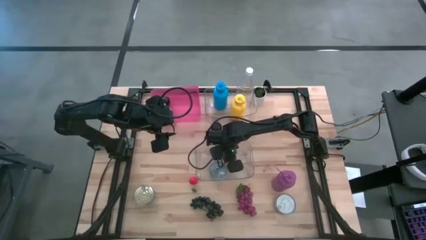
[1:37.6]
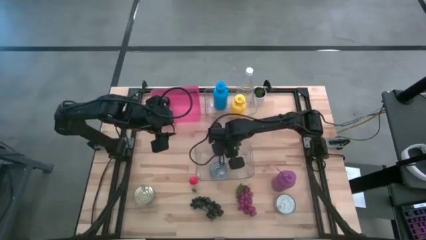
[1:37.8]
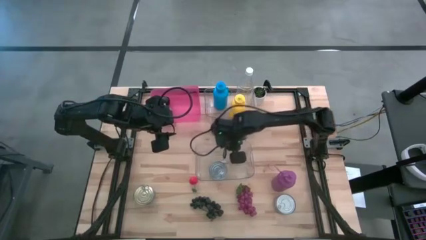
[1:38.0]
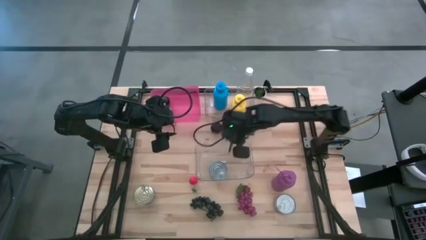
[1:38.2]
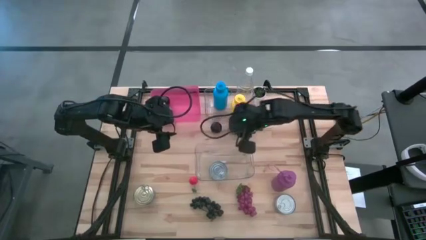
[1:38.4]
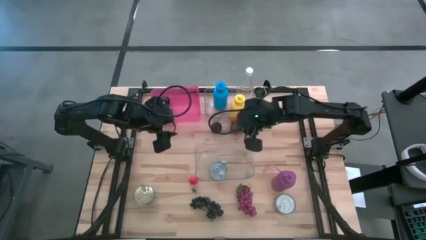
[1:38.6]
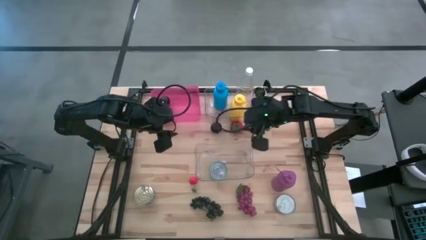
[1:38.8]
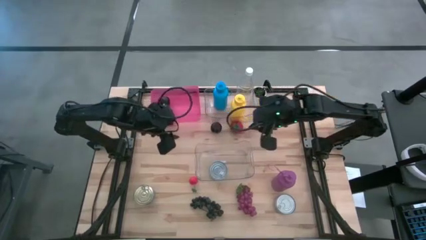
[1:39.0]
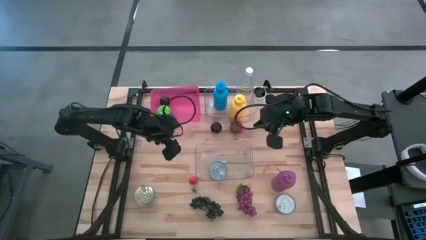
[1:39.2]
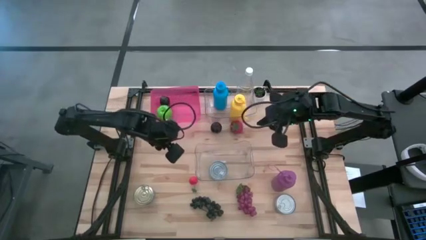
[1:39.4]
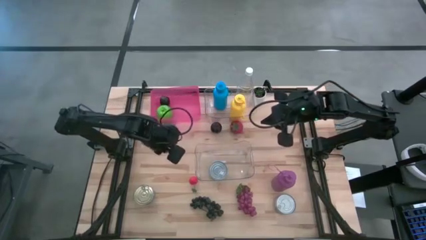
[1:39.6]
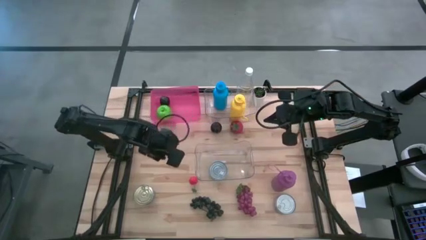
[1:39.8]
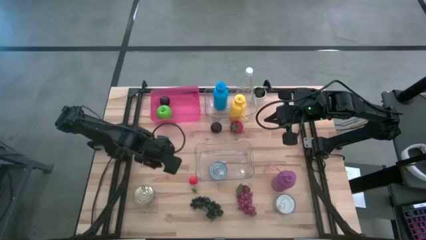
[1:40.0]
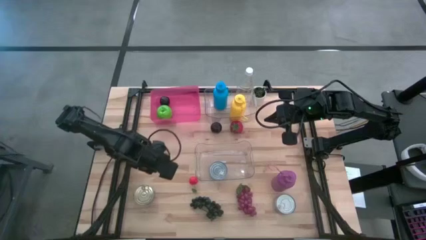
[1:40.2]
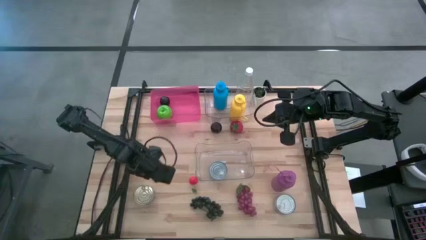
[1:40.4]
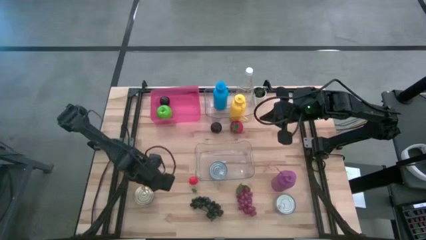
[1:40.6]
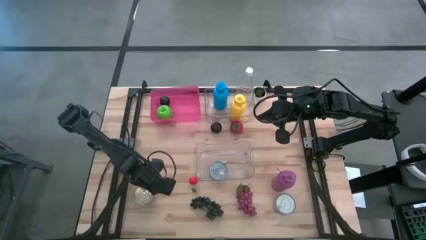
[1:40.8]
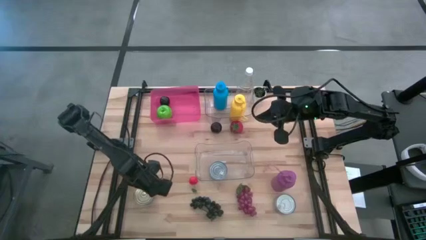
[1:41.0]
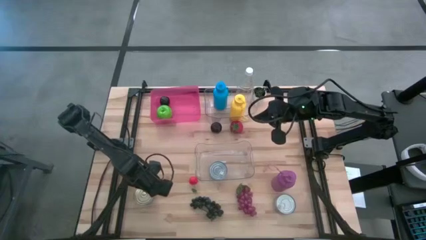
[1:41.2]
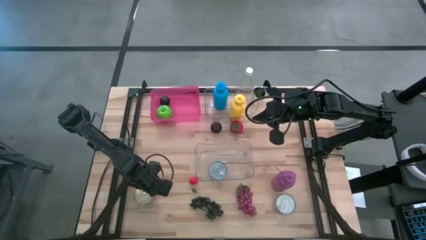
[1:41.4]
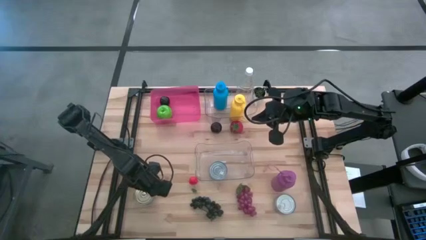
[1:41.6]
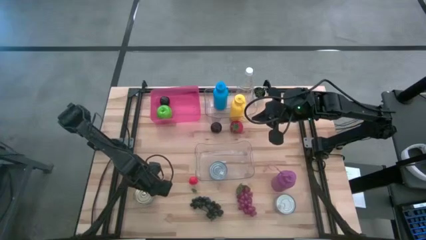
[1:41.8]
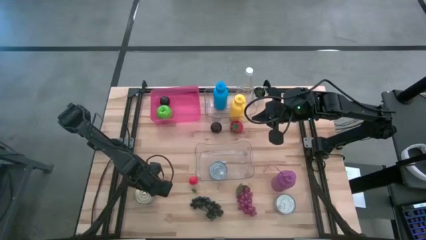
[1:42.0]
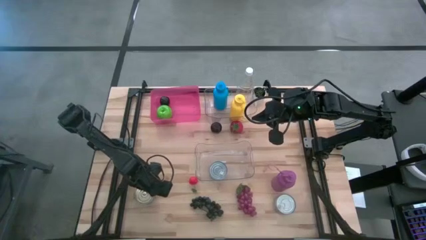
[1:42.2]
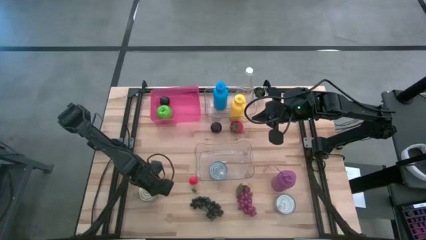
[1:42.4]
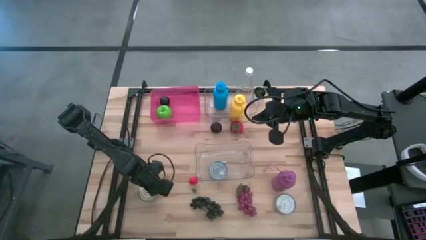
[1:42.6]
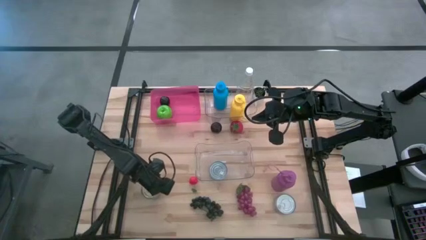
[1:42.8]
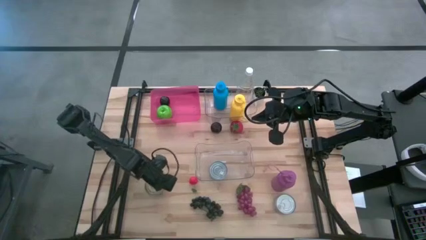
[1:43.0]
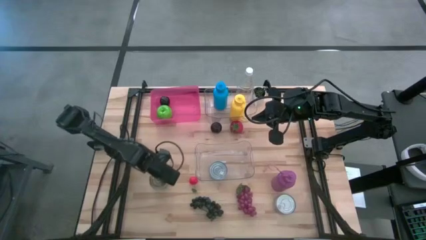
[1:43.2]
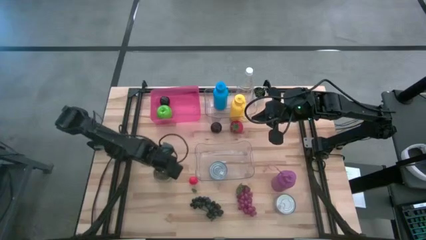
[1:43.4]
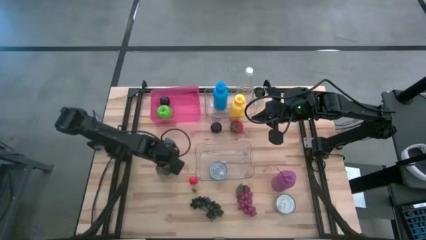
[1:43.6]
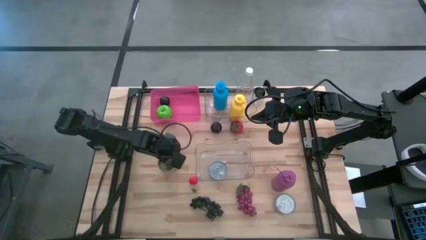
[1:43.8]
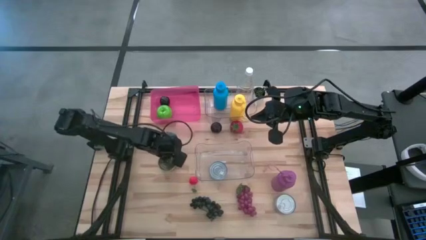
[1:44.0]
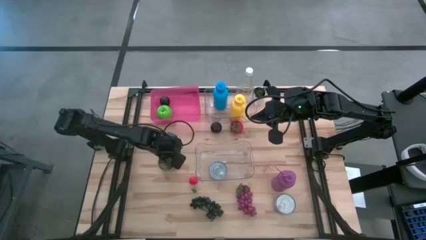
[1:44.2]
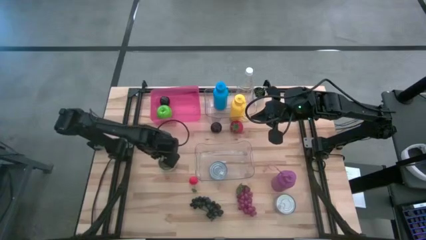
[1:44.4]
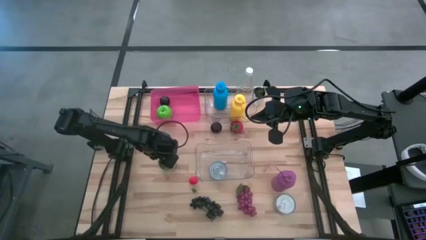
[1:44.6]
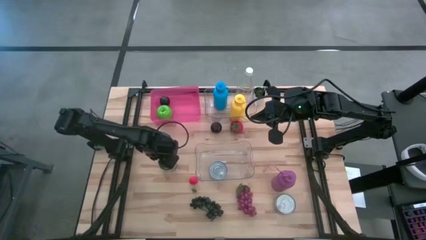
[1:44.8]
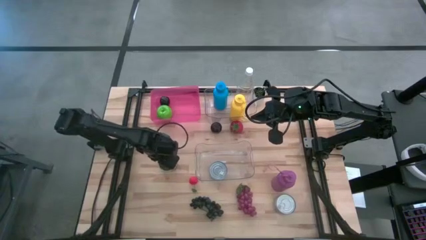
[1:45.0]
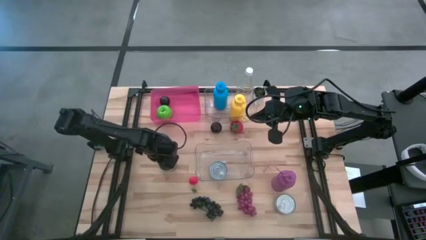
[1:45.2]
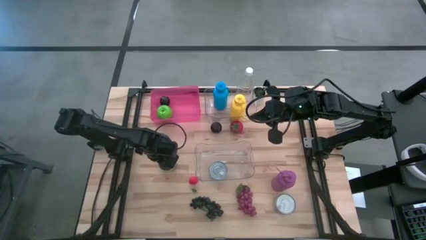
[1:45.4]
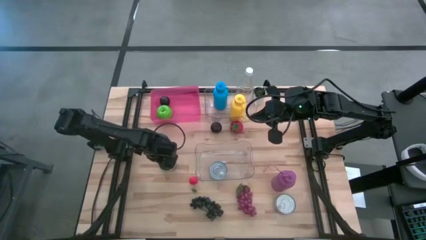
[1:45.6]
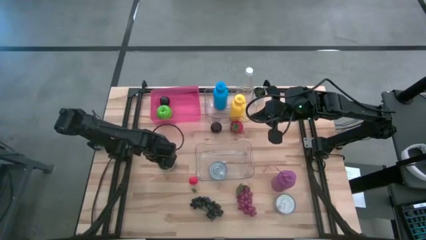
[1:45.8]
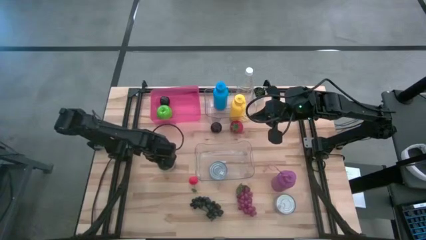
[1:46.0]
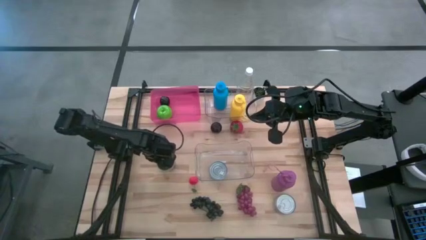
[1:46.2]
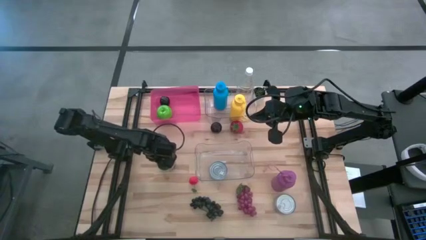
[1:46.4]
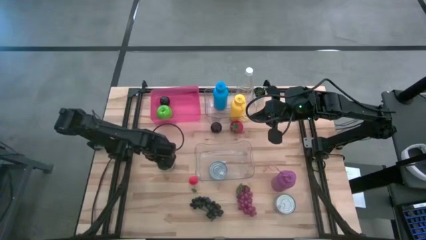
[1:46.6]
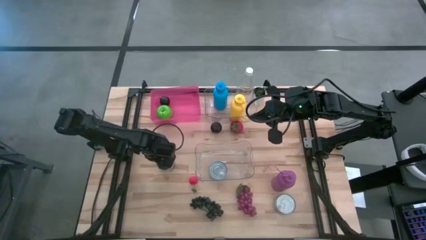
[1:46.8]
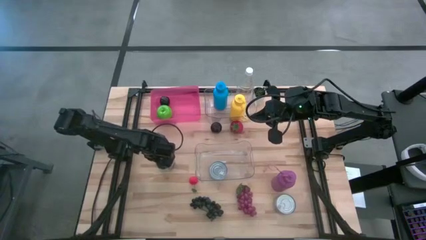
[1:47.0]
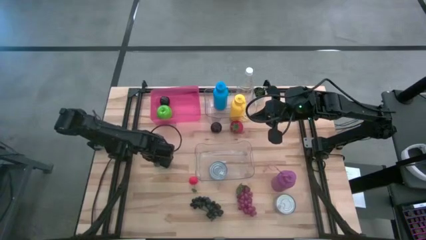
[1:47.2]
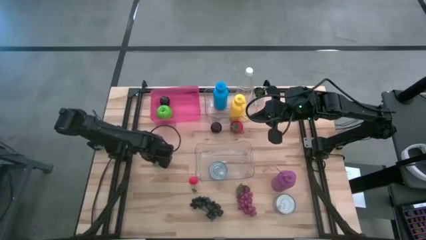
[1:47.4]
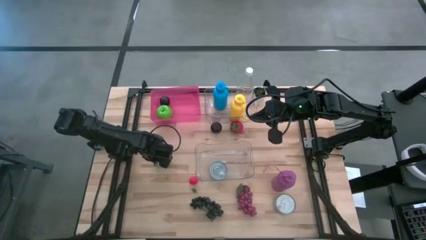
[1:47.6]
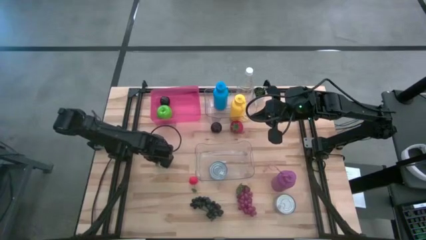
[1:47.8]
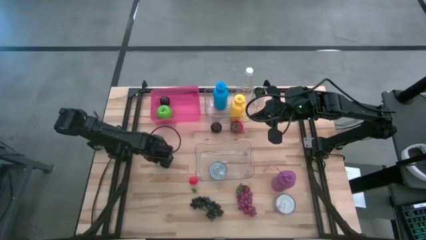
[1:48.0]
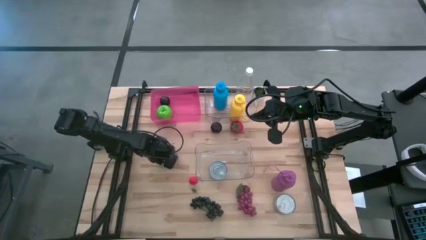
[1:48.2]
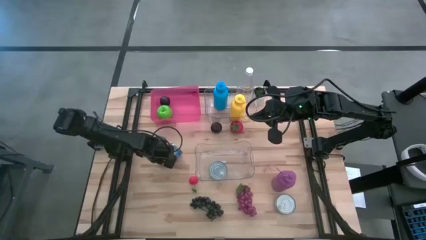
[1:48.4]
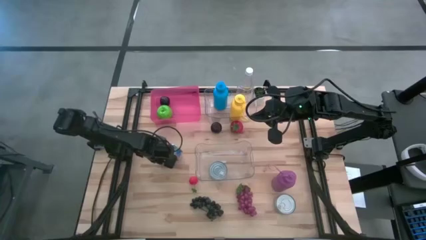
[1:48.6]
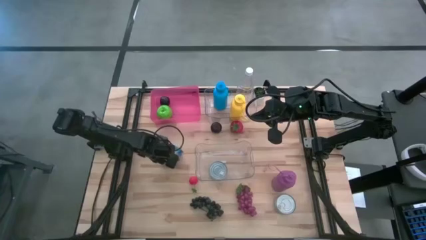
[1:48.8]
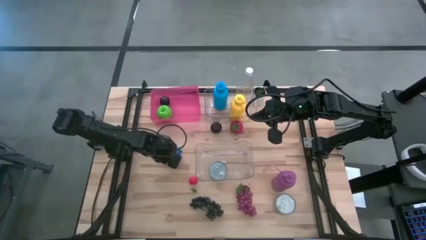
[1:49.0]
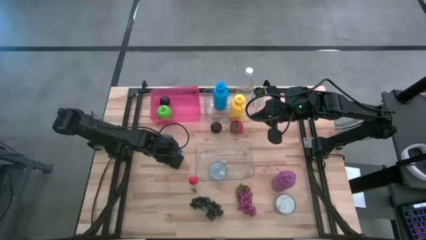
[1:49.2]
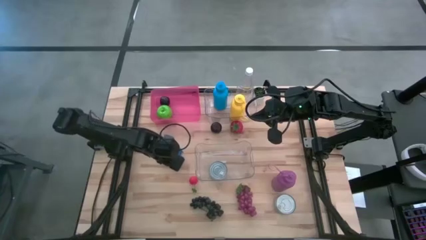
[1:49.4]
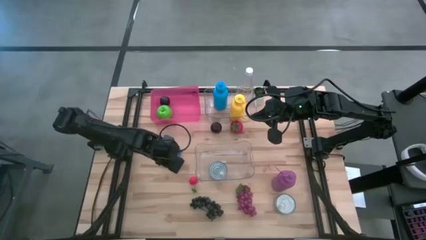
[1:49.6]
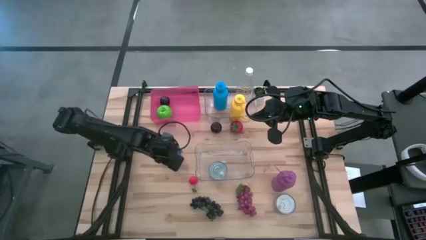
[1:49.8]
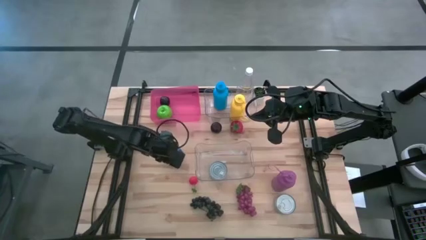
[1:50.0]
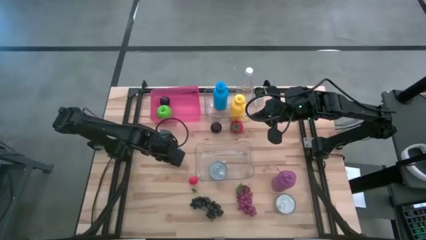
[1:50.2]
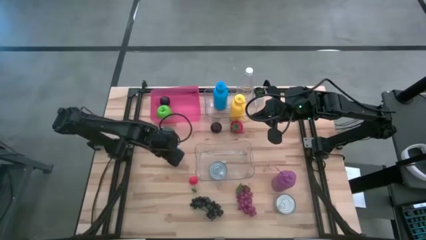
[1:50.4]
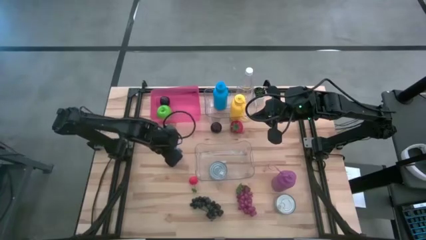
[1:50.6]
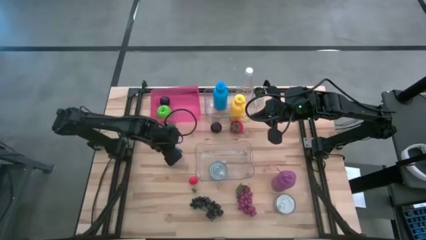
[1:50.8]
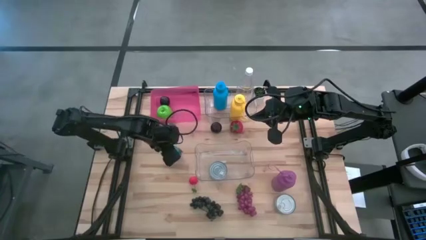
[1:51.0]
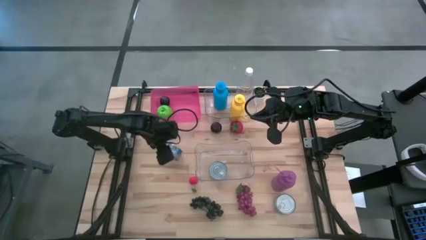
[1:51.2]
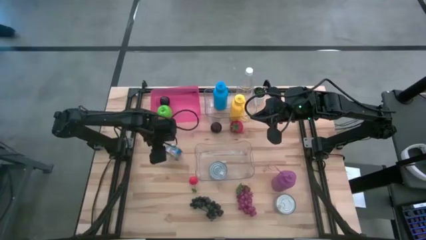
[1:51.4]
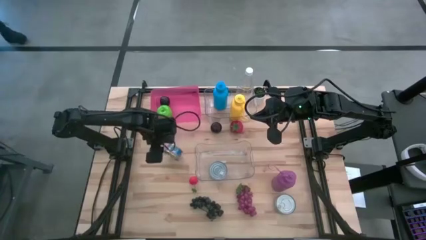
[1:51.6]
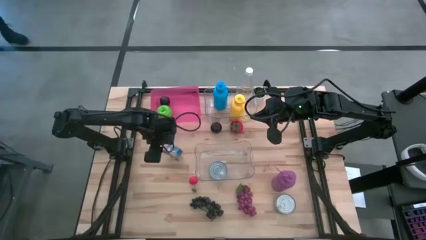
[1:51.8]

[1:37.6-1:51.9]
Task: Pick & Place Food Item
Put the blue pink tuna can into the bottom transparent bin
